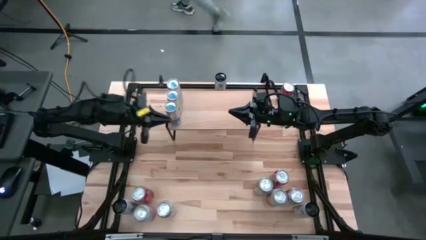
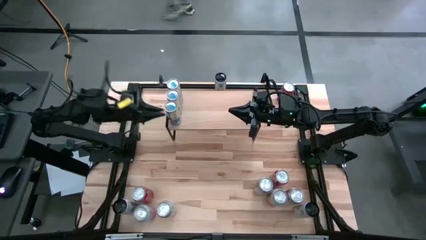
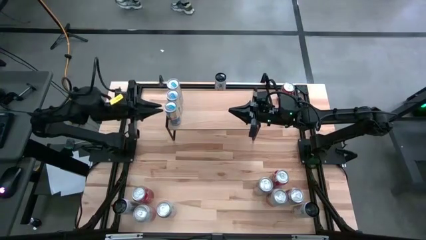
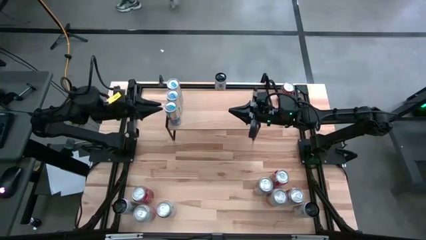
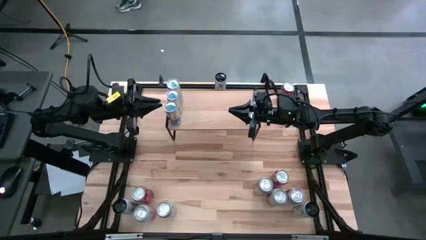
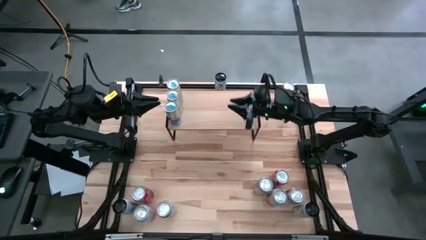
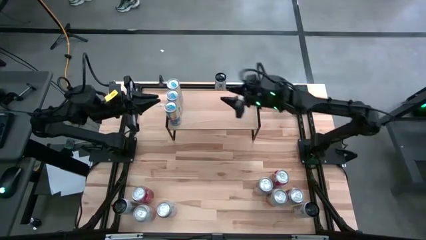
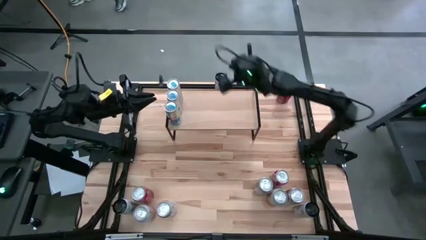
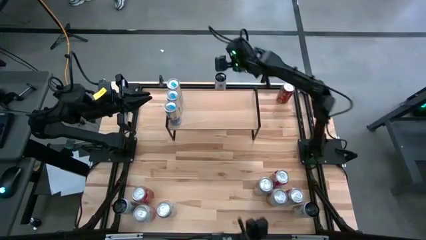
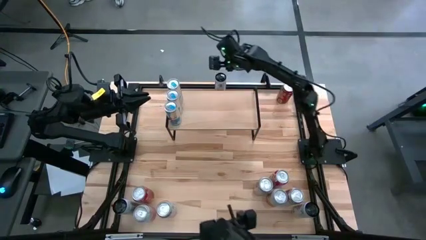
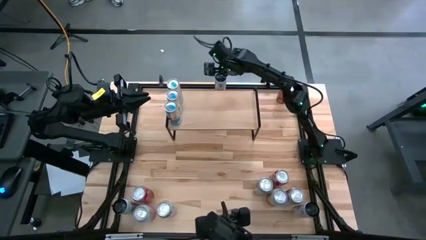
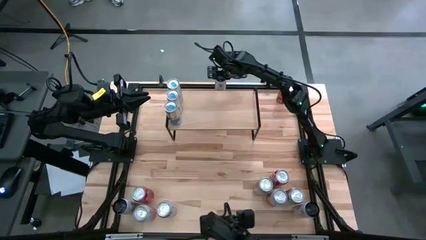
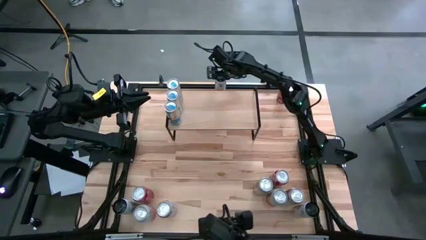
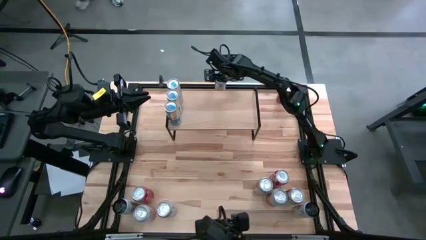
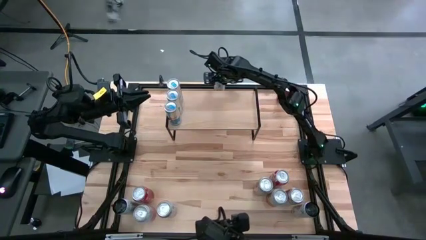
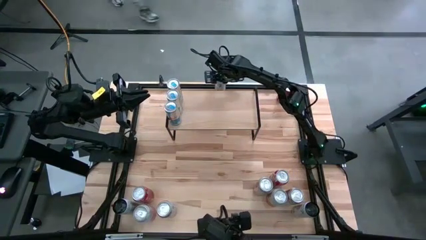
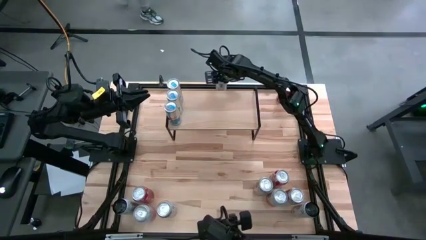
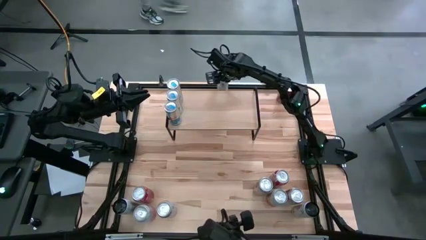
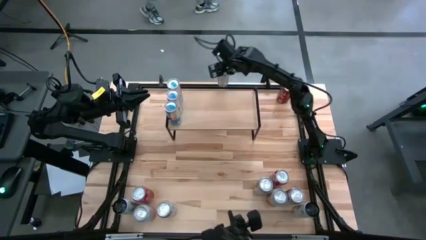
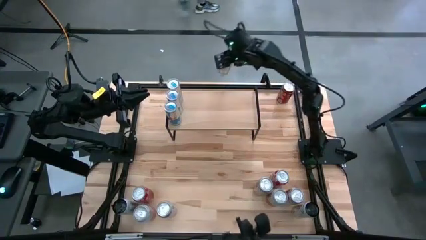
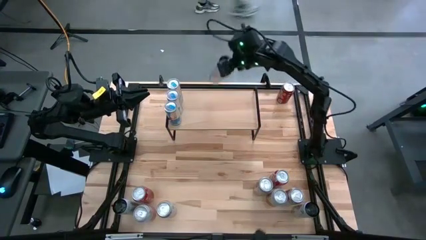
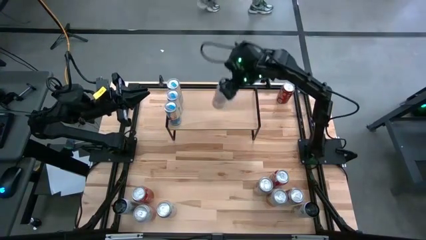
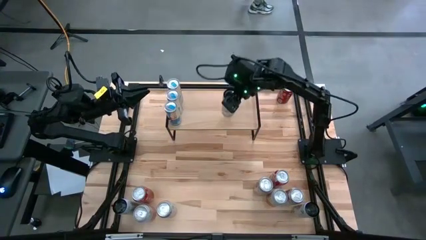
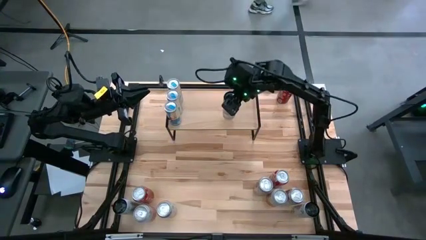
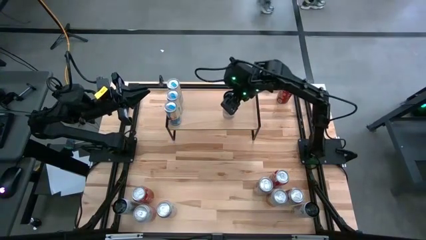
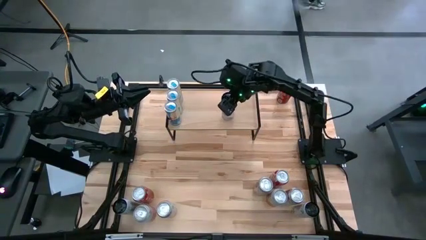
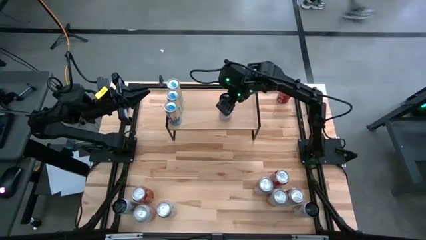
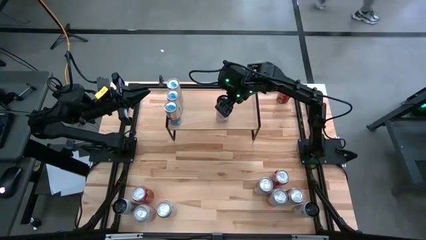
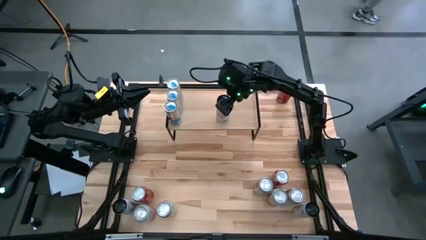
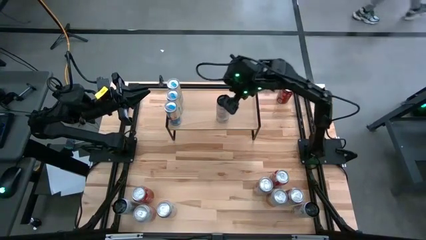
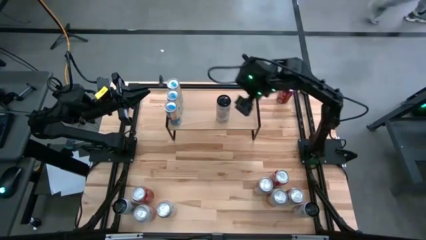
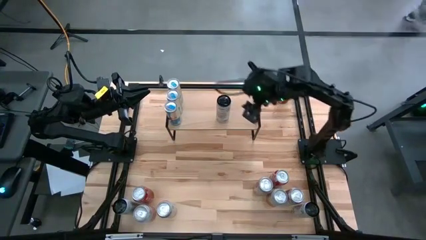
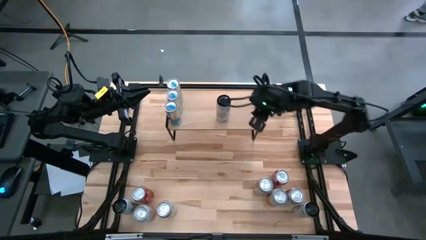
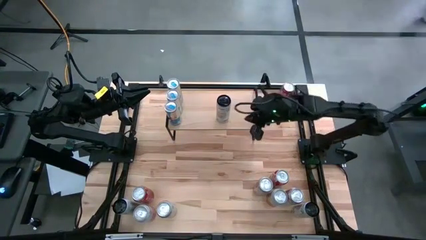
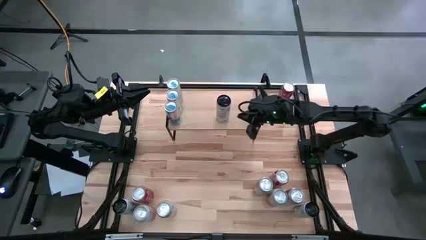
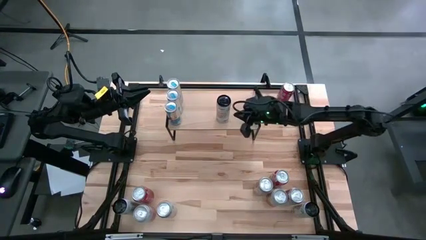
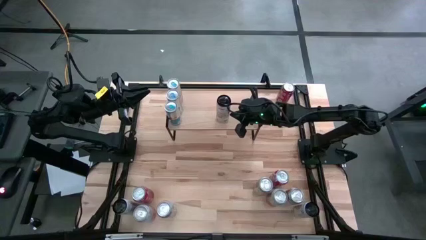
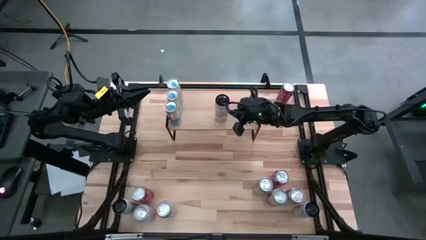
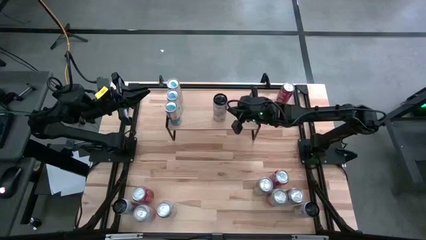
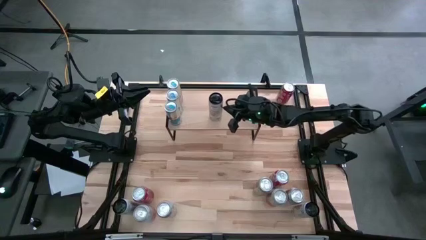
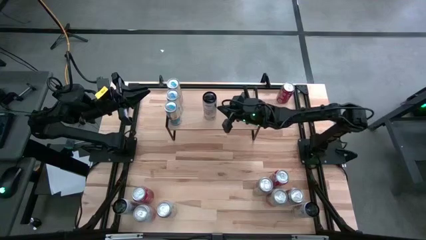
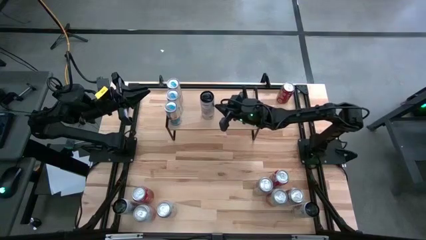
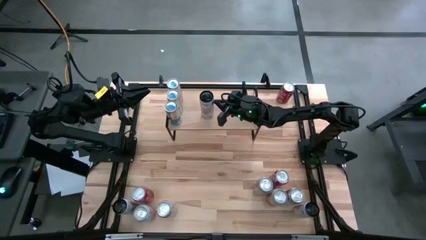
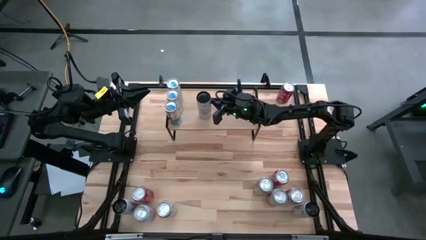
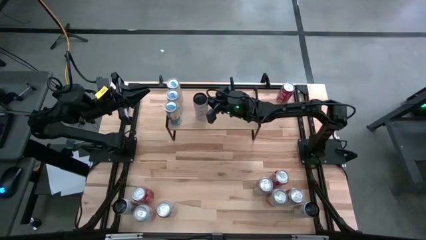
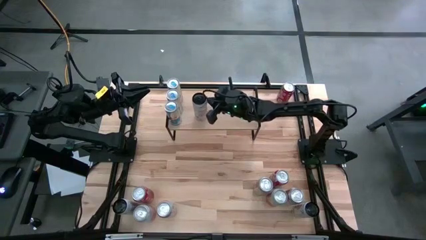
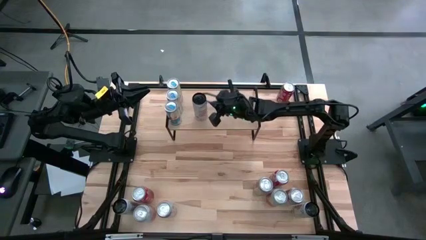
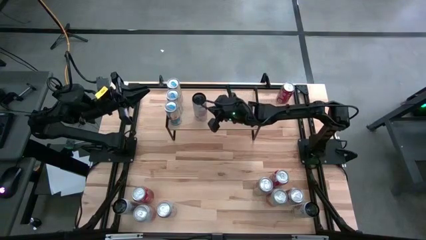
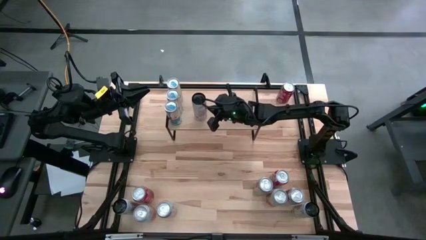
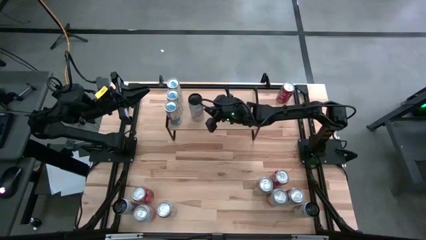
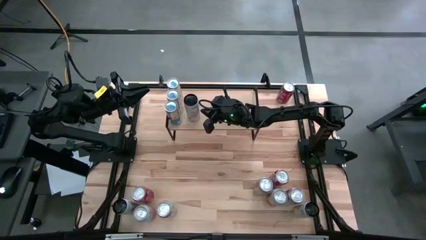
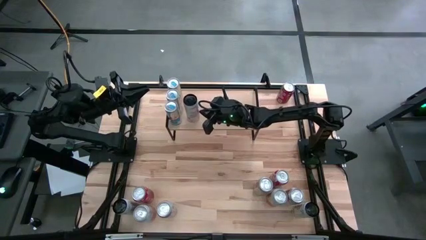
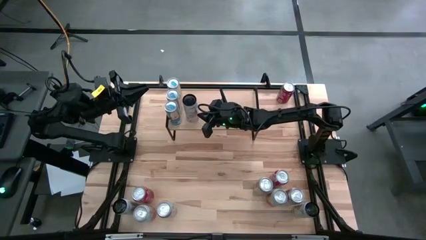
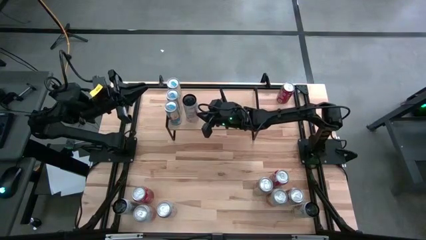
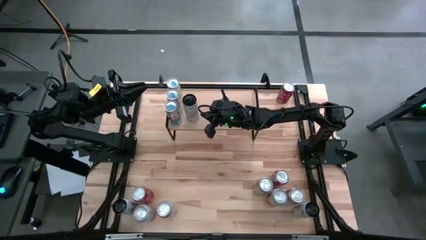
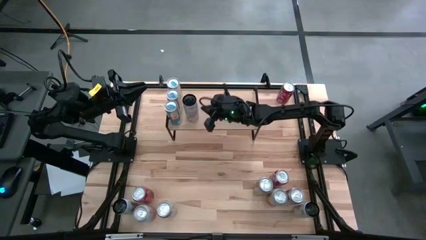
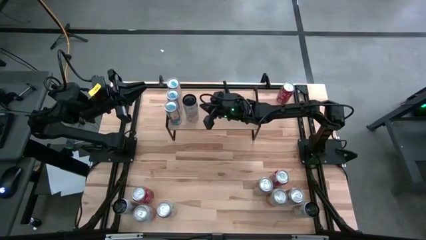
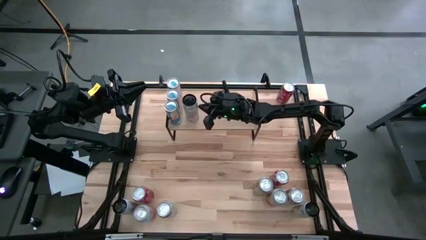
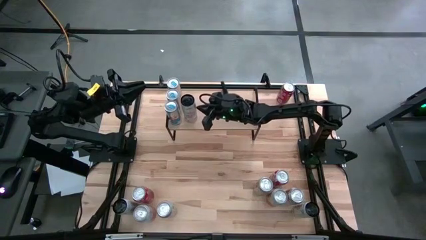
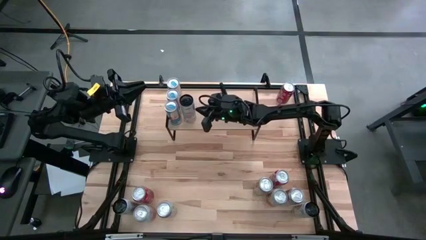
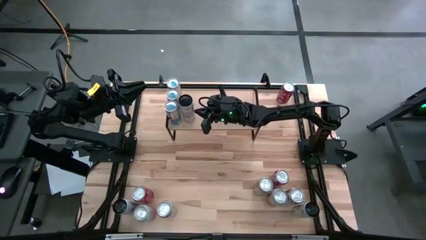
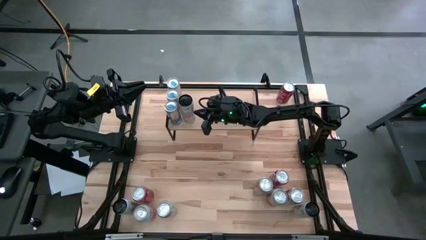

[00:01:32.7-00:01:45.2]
Task: Place canned beverage on shelf
Put the top white-pink soda can on the shelf
